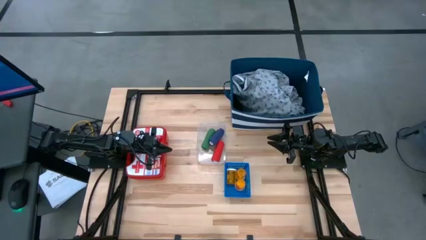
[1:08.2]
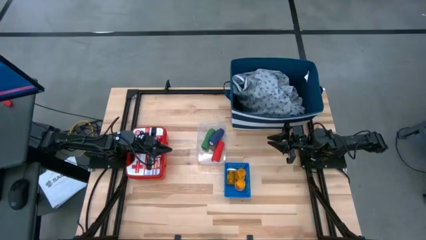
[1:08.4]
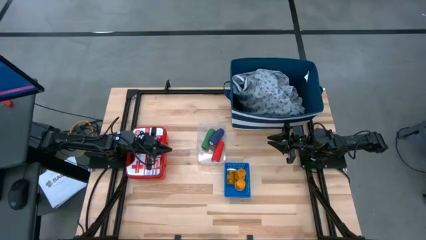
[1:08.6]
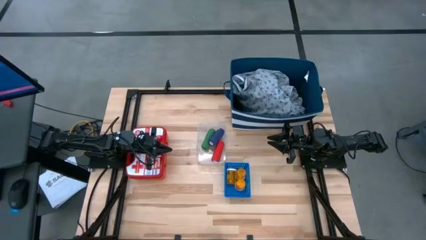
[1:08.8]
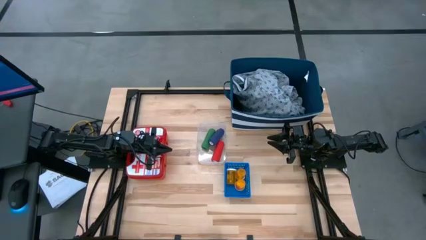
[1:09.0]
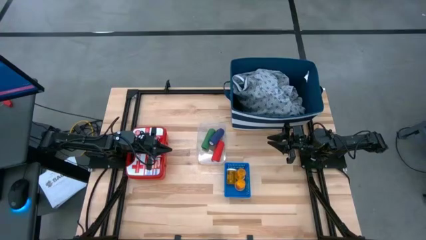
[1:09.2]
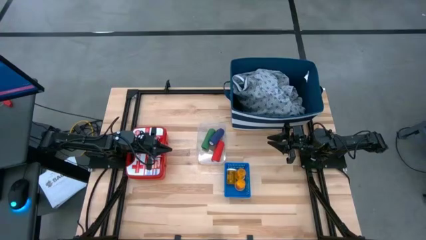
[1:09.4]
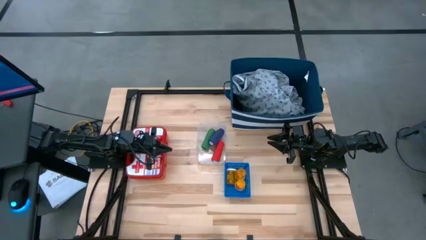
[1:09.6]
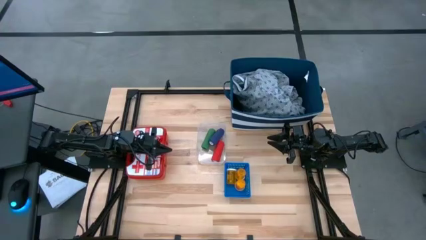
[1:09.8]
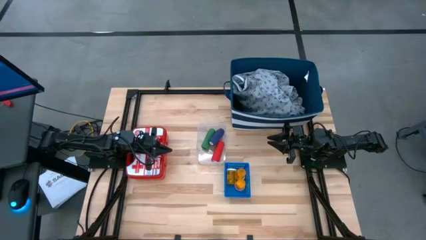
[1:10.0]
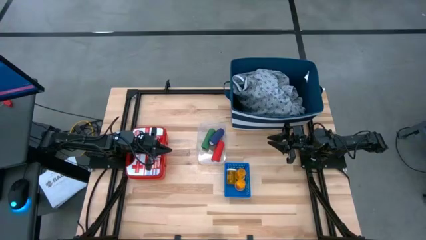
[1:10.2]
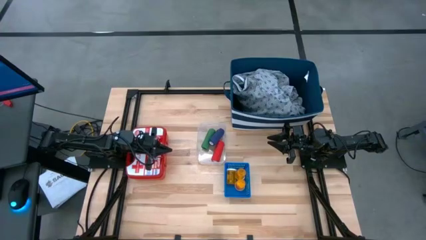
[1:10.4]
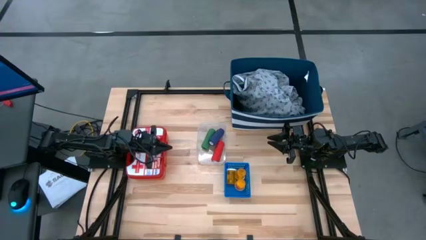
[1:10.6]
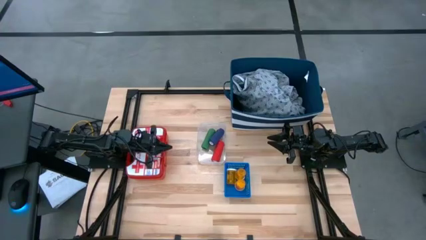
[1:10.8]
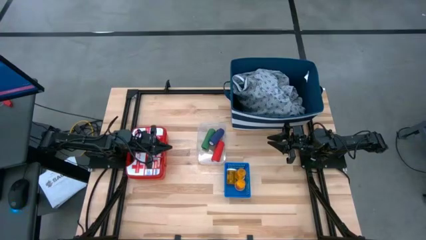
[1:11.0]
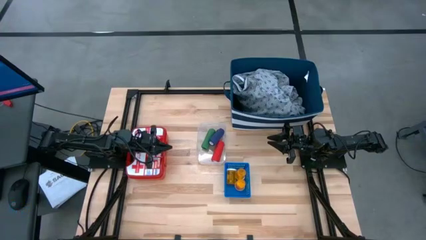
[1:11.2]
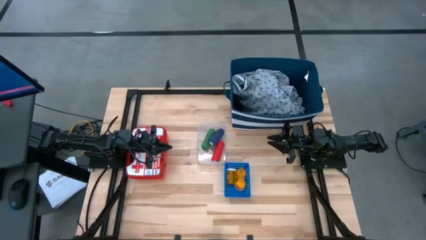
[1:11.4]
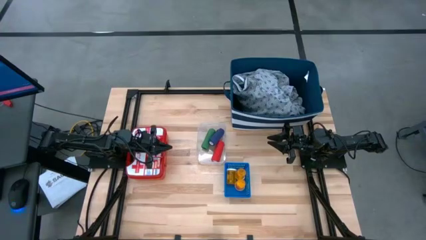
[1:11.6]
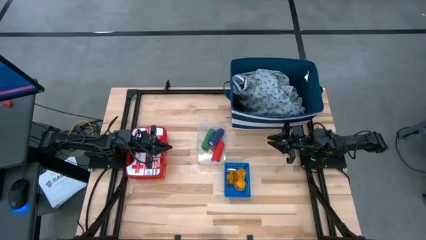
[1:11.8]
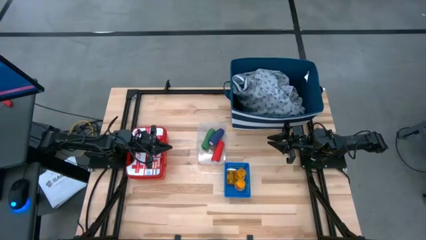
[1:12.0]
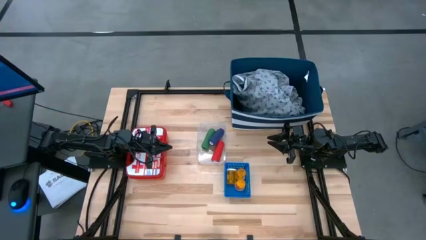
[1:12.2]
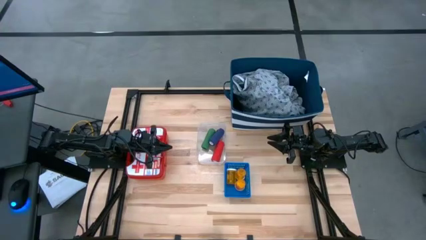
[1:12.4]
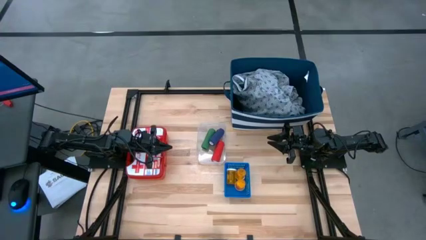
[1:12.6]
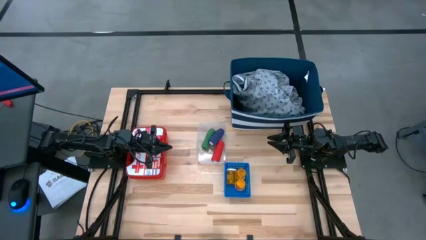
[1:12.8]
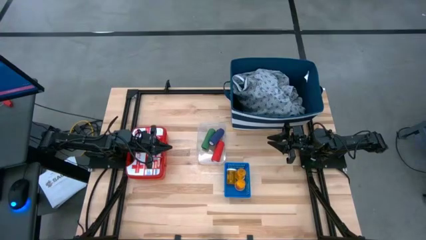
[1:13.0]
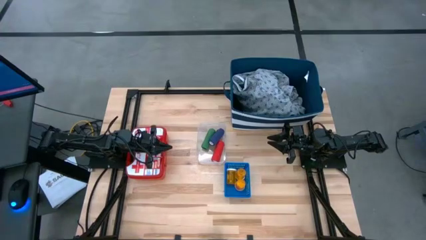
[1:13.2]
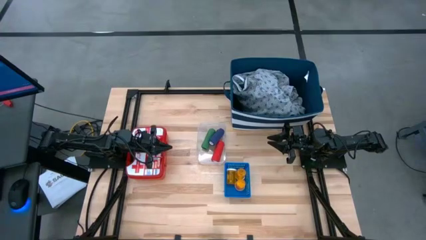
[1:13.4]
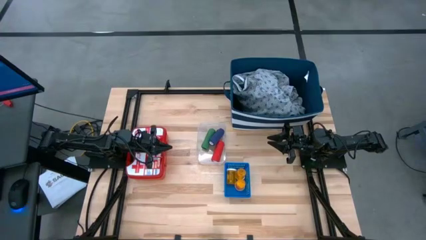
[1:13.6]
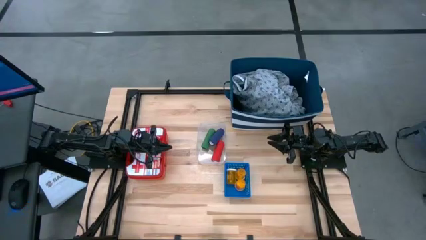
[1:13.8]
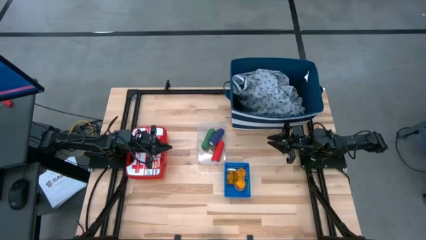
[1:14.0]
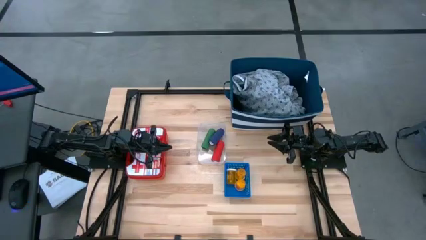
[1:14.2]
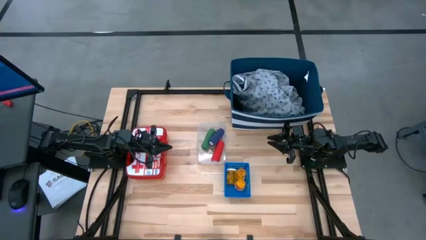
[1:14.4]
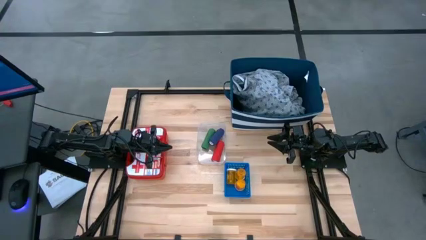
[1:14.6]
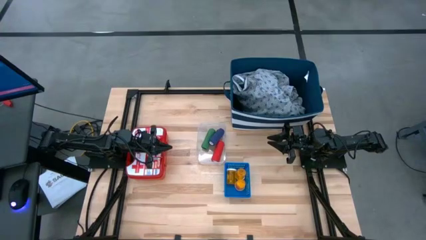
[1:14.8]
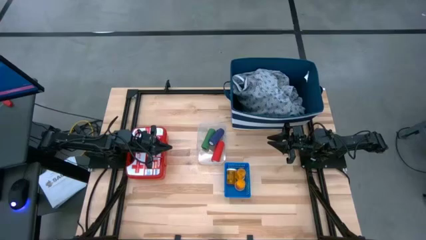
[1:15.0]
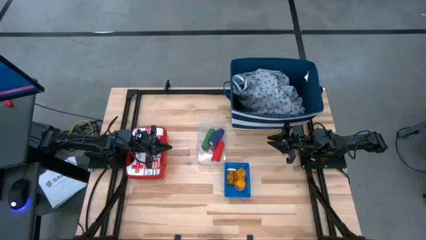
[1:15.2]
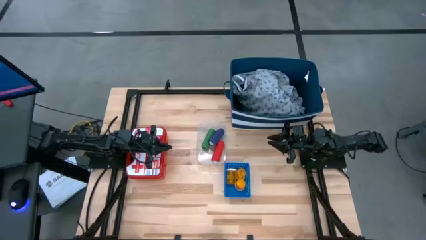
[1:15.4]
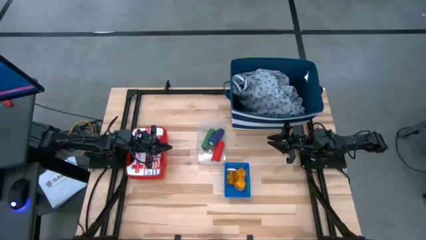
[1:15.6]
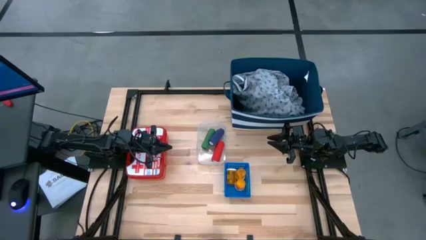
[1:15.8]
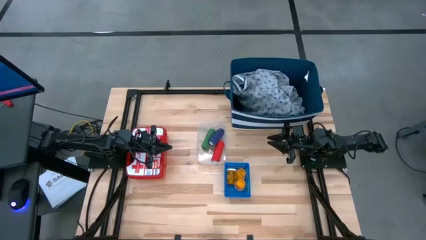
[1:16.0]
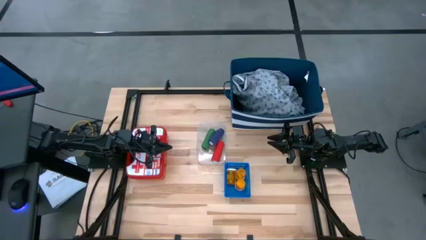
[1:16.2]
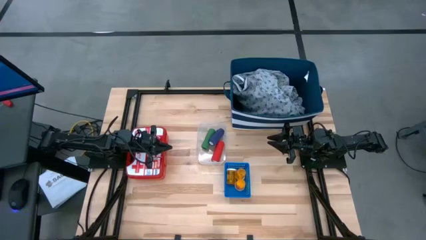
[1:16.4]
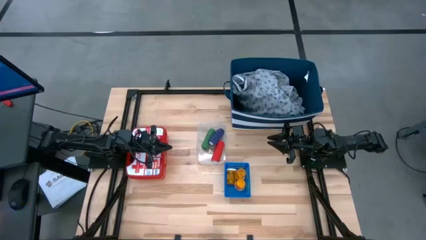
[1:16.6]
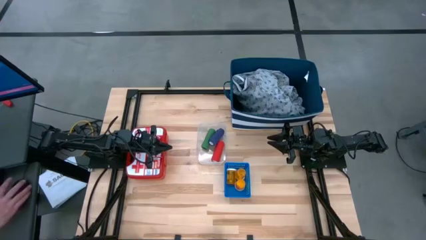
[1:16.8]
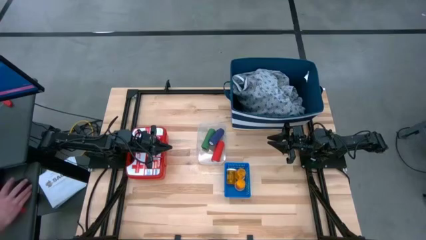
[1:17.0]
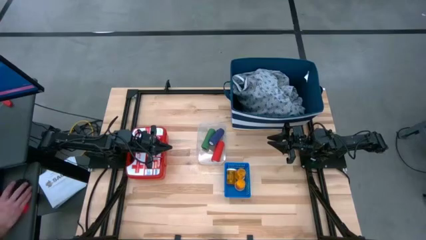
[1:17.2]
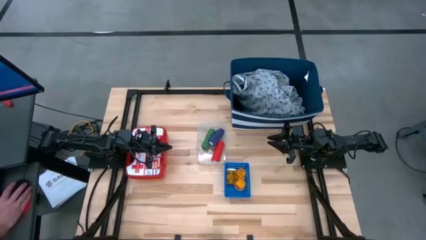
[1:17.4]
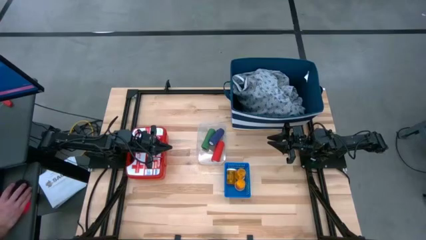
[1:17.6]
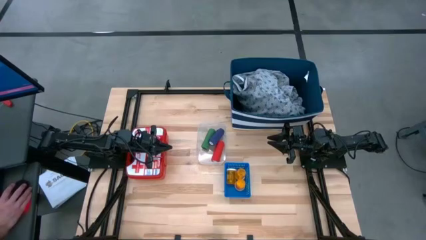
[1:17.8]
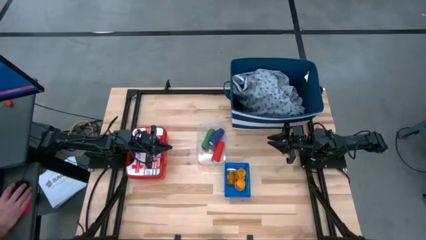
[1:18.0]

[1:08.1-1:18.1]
Task: Pick & Place Medicine items
Return to home position

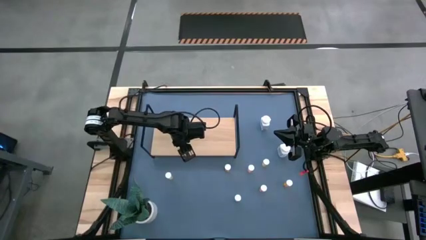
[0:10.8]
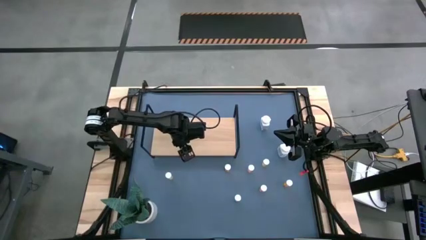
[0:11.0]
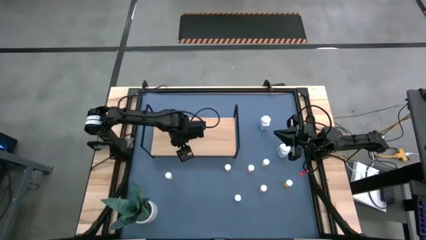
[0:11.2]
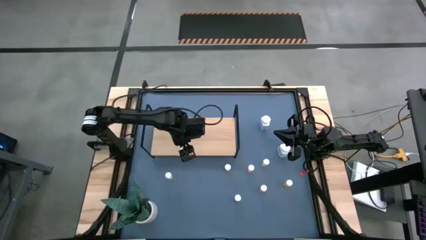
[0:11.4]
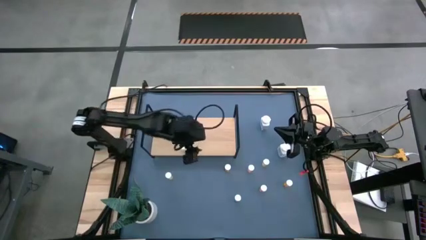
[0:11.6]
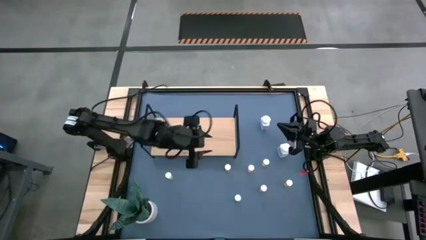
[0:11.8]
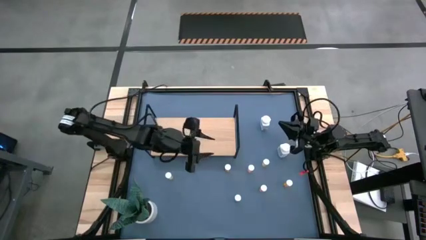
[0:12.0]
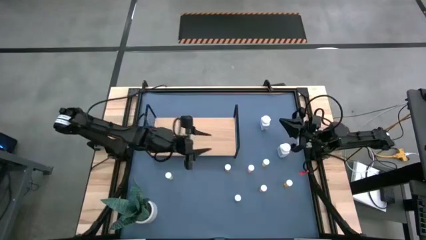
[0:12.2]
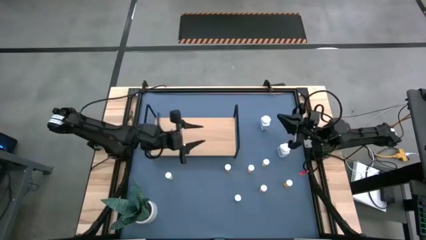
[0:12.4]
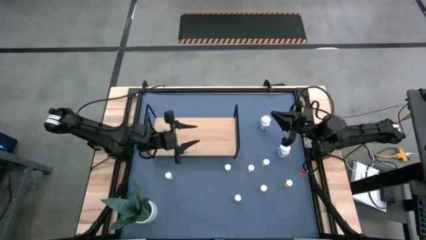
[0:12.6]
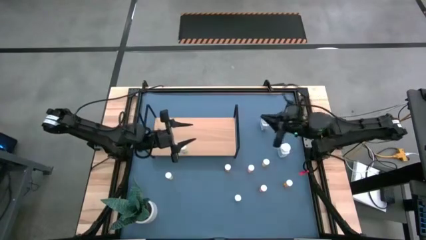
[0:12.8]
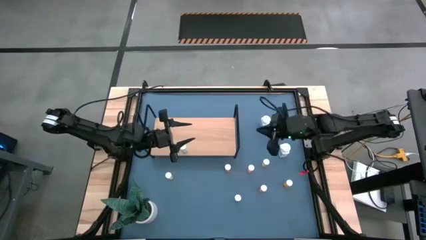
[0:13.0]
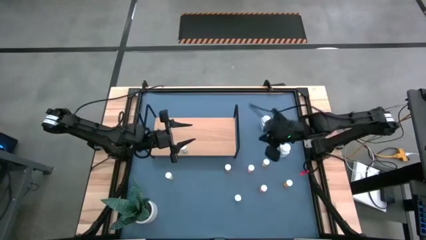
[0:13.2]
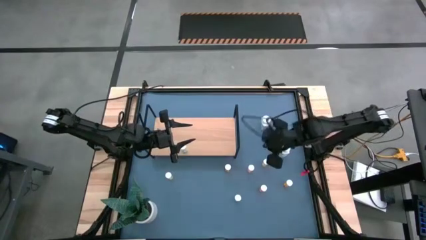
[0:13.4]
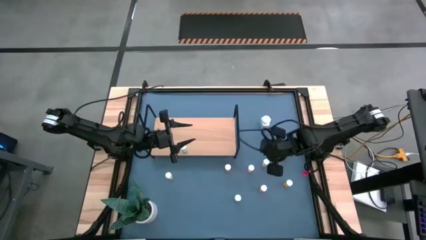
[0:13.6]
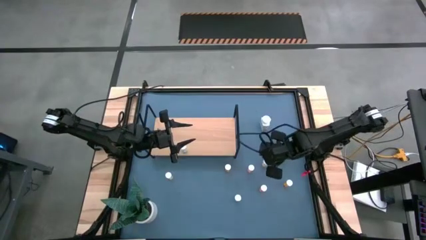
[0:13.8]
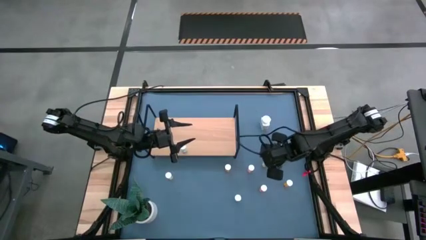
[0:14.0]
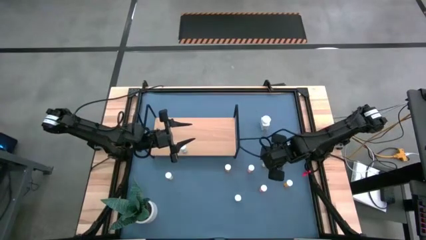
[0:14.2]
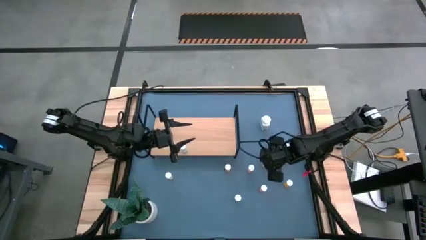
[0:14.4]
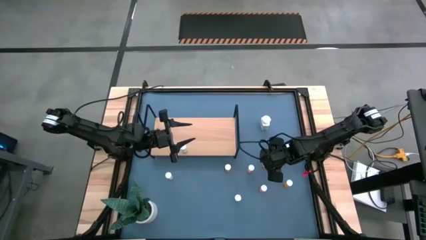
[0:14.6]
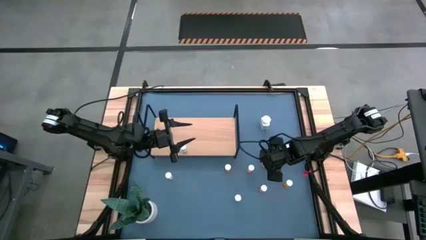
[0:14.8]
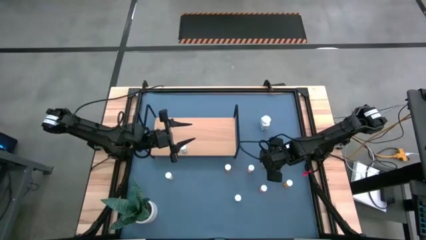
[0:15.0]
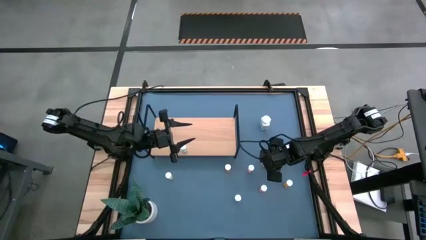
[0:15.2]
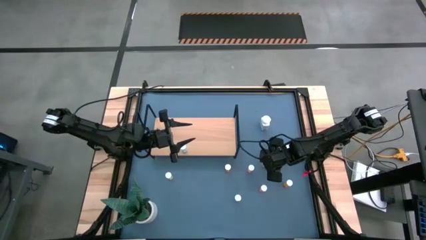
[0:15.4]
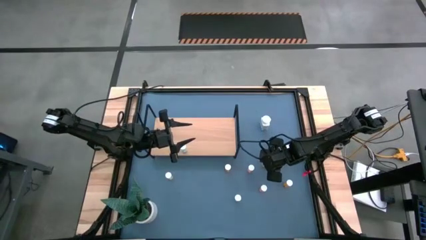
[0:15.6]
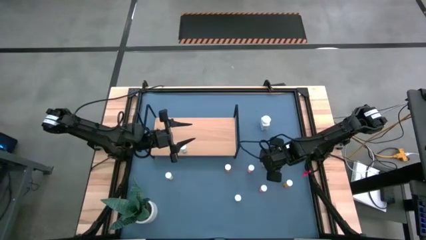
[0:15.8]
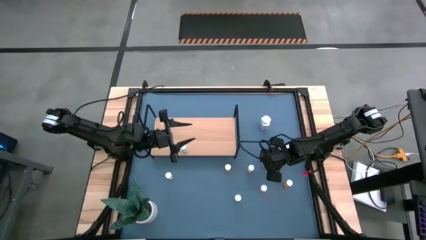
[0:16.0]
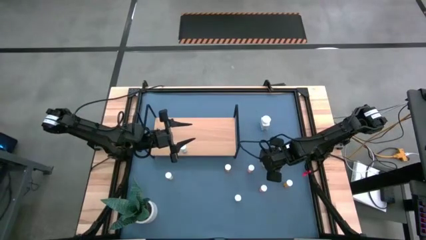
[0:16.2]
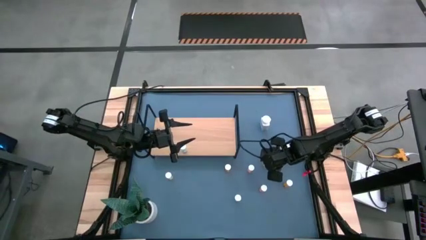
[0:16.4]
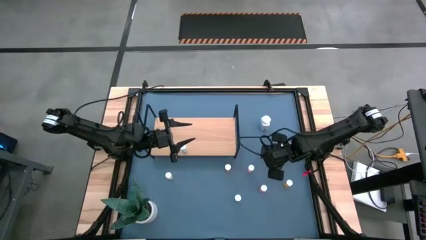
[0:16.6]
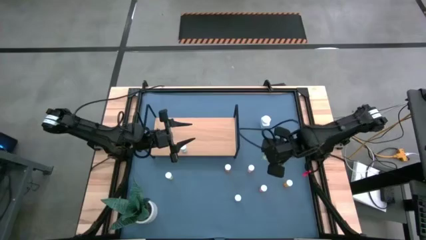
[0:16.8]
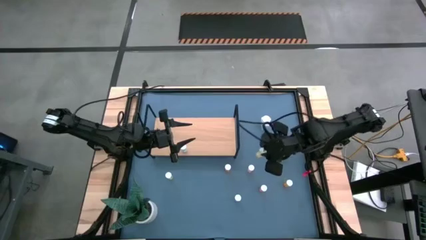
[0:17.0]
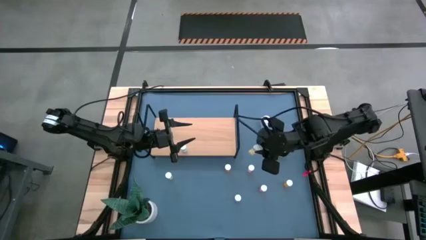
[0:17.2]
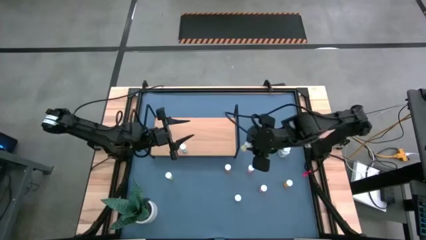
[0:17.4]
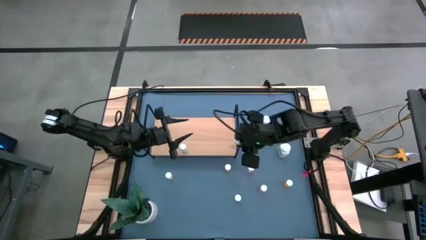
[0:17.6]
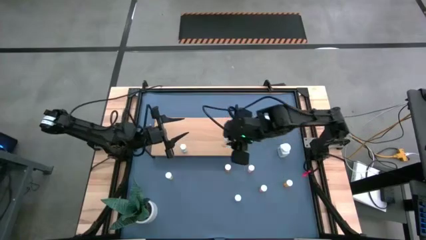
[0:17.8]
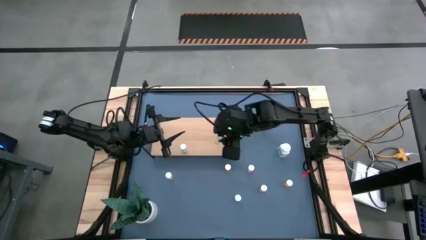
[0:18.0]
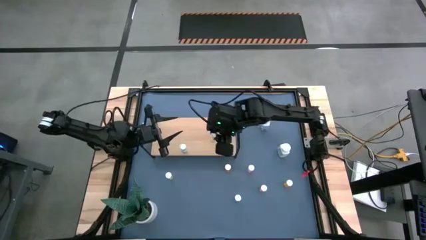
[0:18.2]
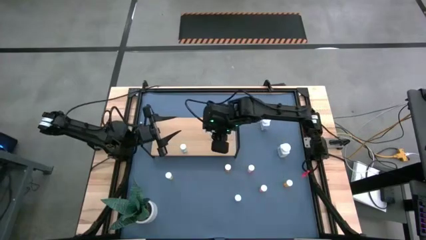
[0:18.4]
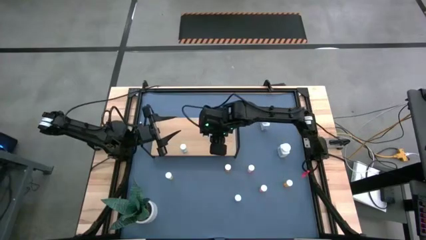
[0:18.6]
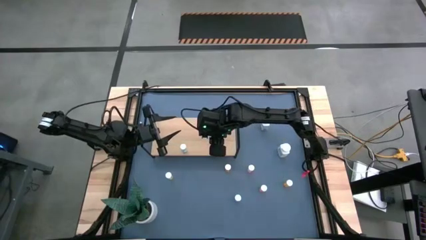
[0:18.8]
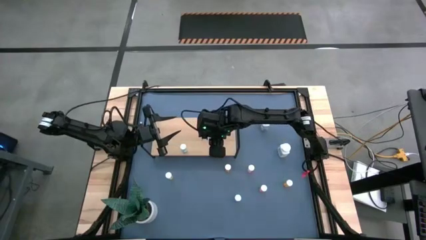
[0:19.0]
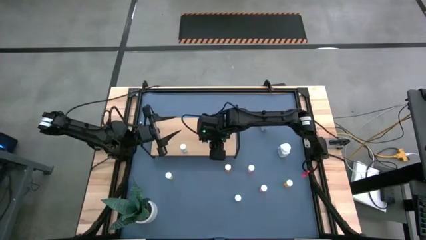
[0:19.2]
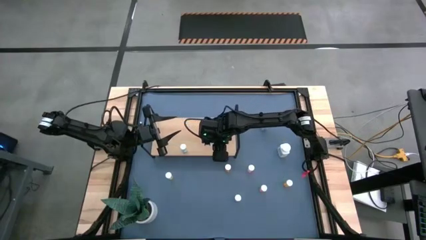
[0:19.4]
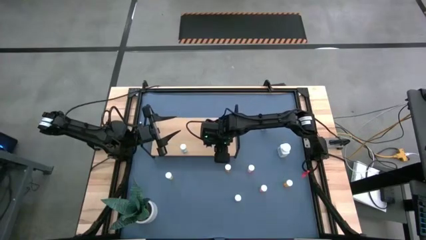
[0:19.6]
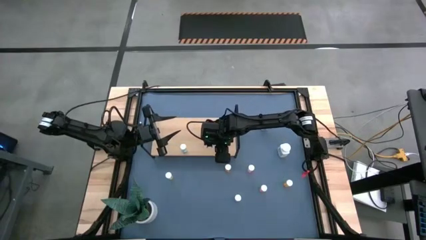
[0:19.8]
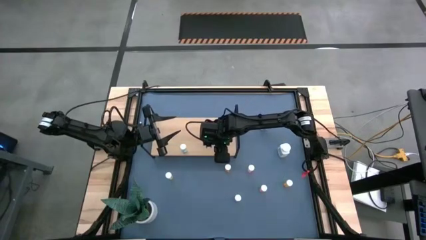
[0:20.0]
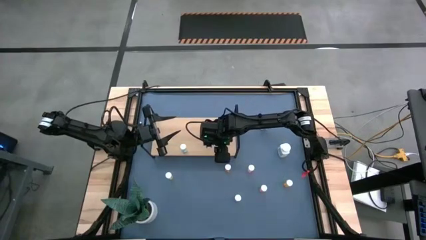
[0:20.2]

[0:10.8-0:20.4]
Task: Pick and place medicine bottles onto shelf by color
Put the right yellow pill bottle on the shelf
